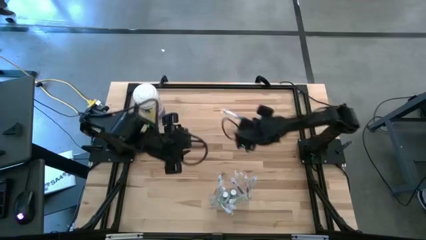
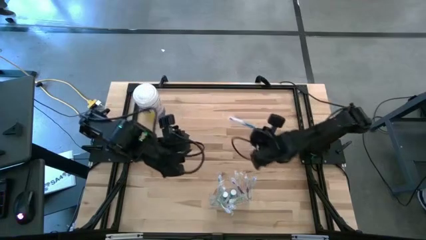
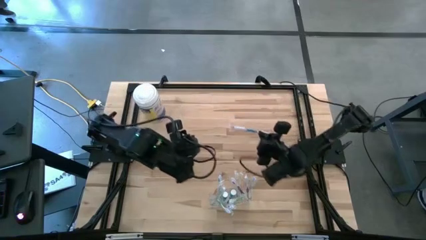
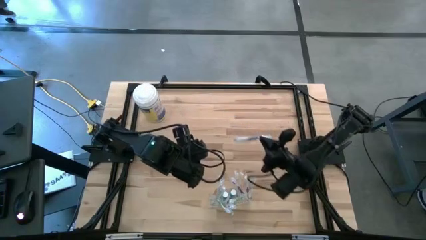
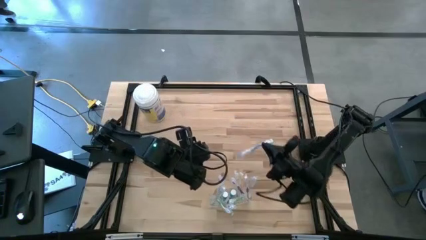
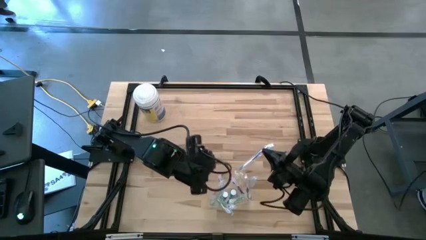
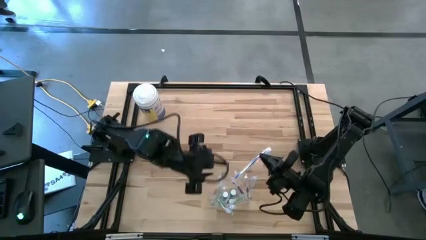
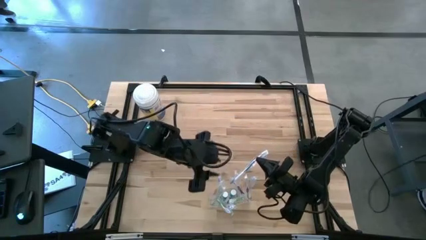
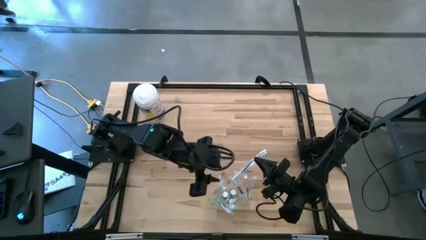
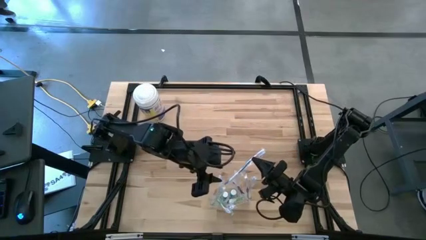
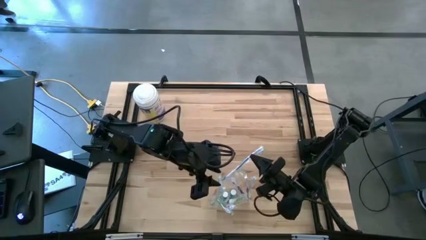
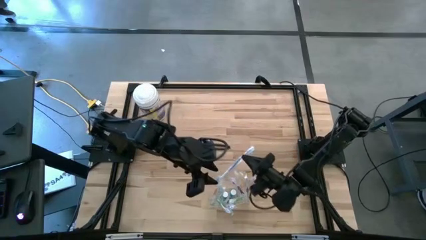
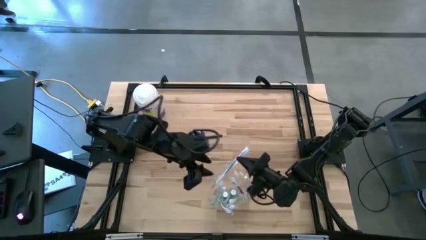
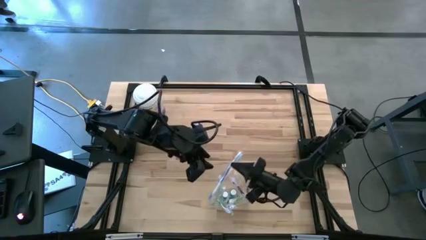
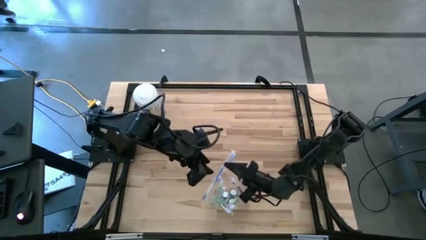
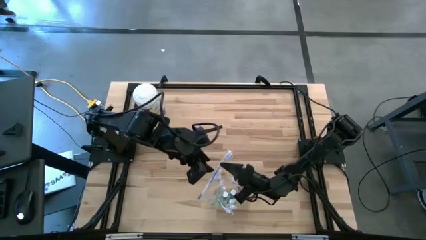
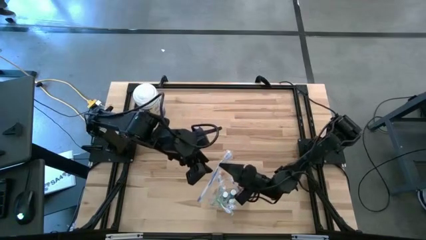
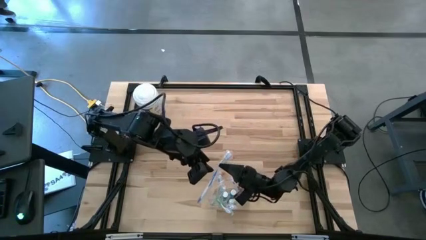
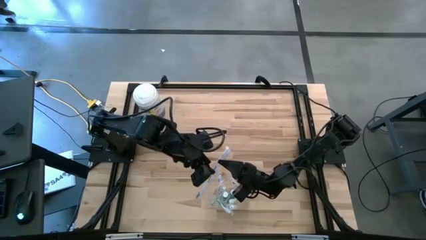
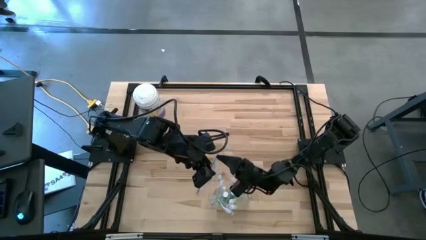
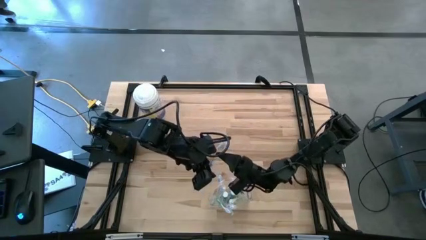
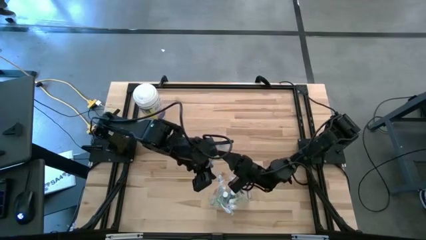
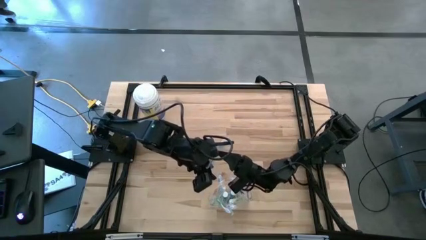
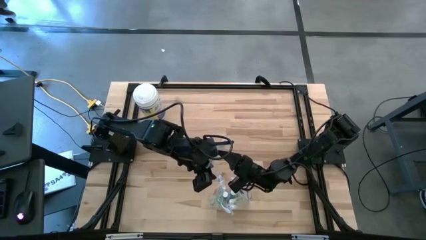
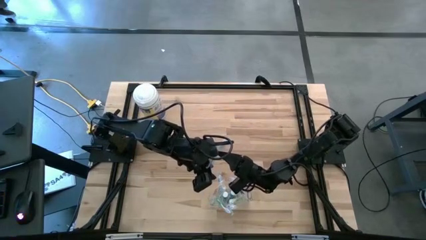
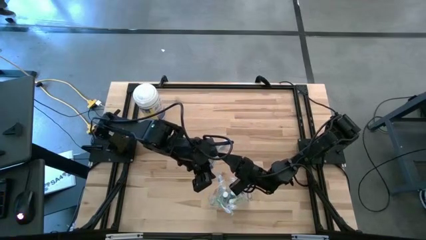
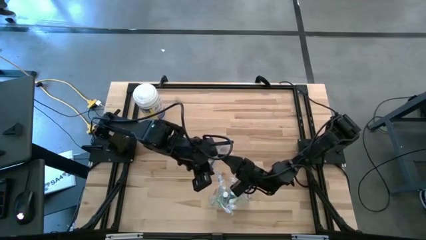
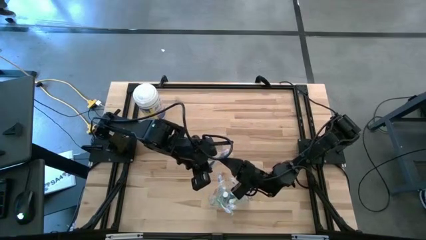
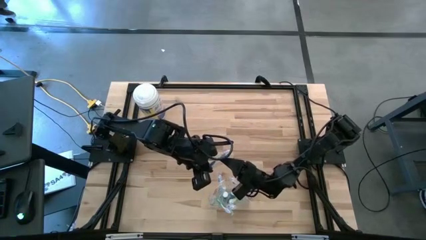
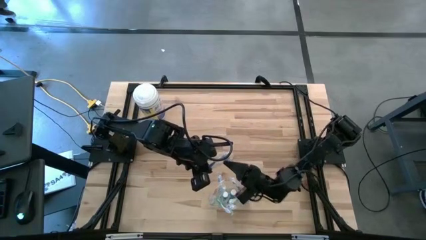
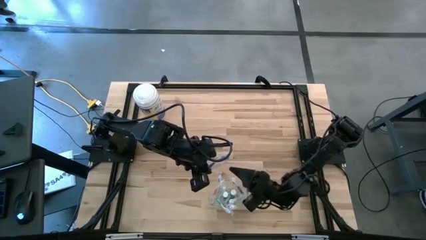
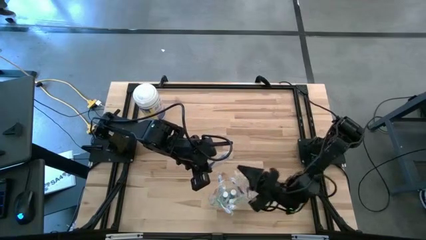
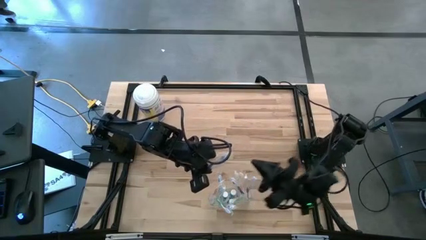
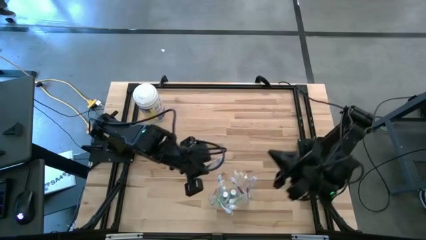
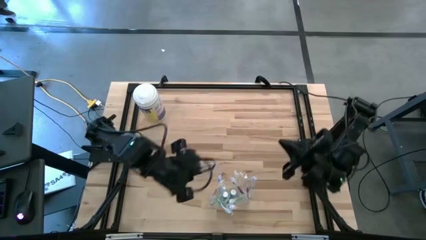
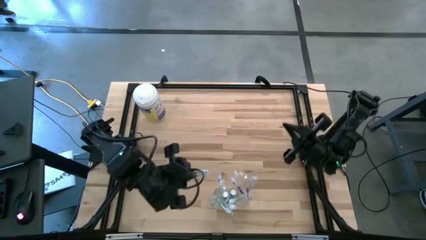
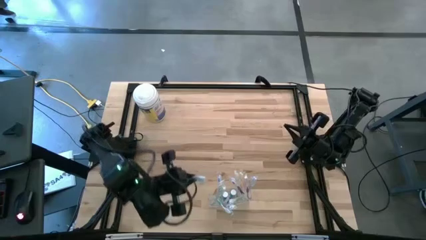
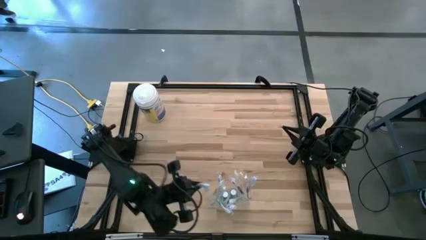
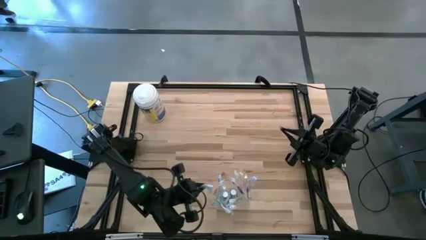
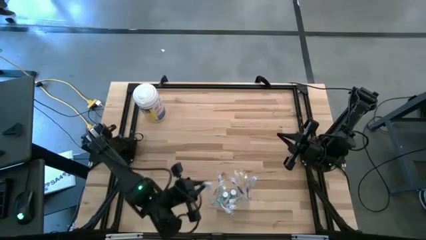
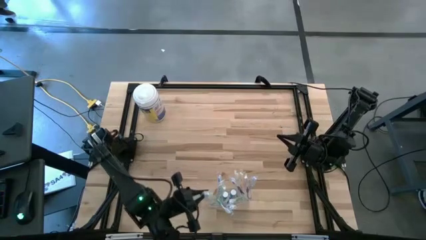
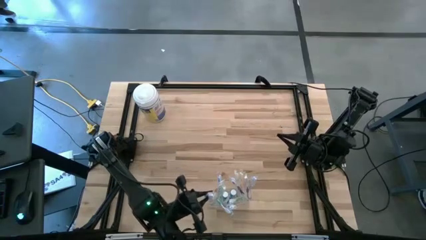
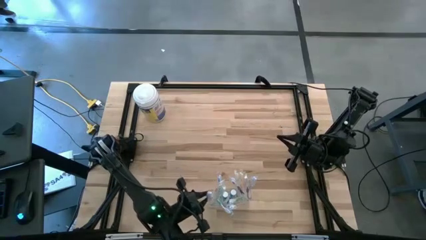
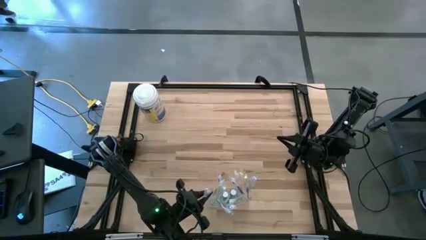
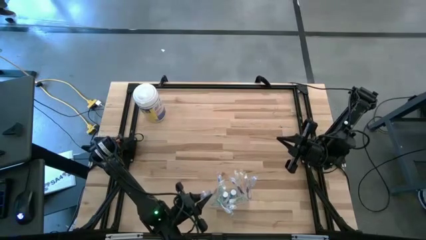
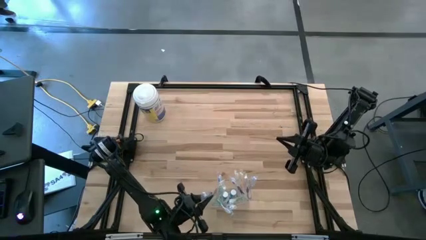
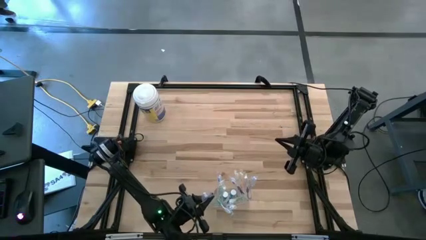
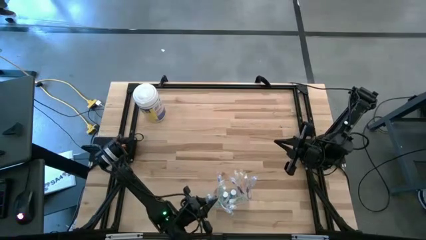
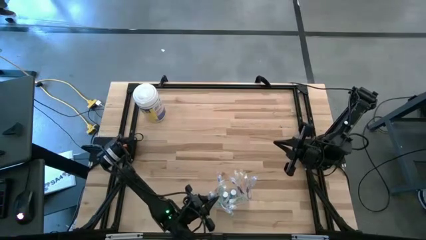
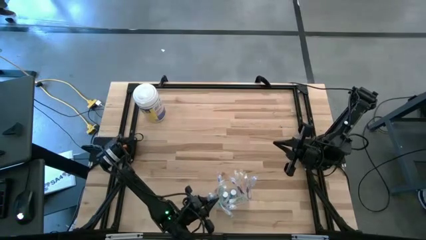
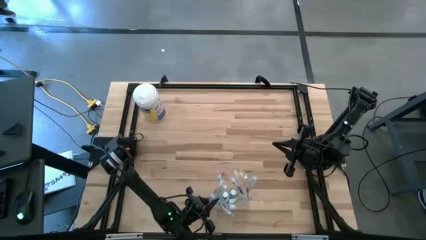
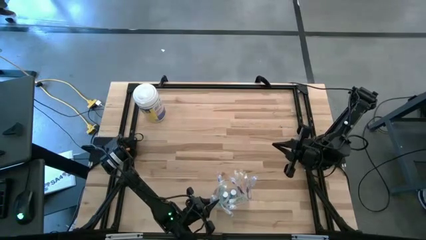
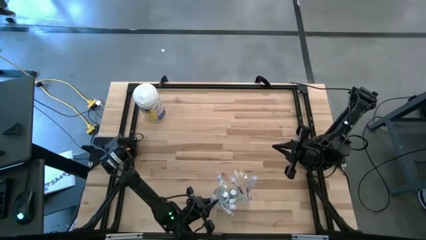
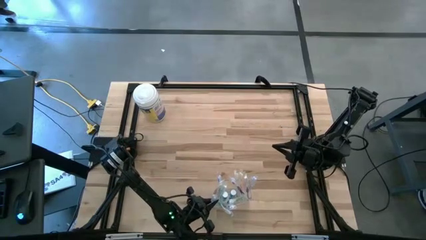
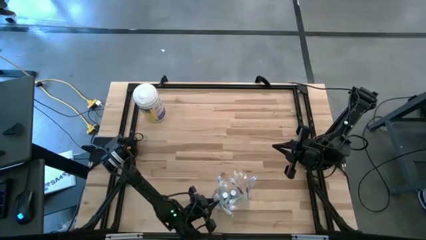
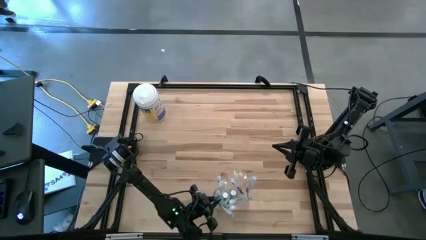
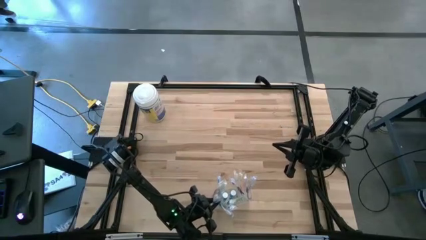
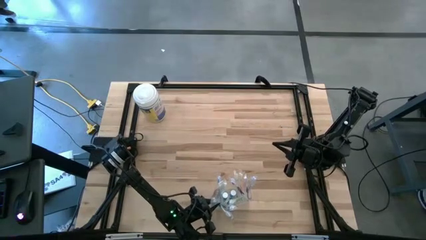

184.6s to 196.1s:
Task: Pick & Place toothbrushing station
Put the blue toothbrush into the transparent bin

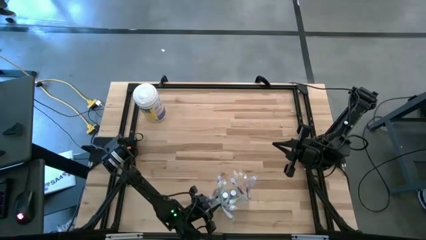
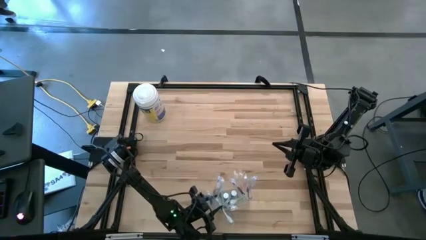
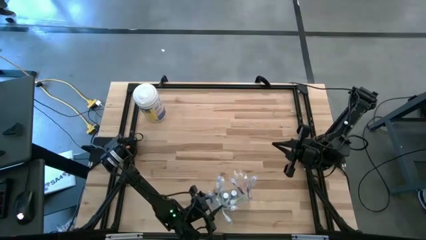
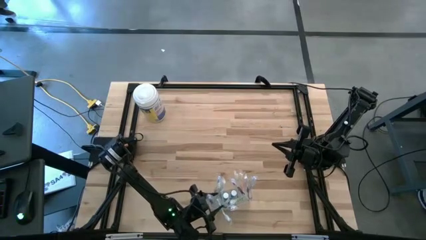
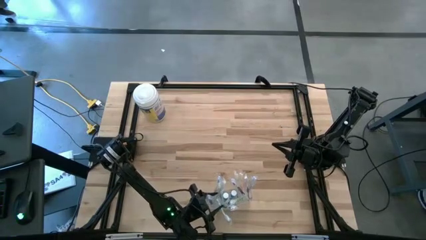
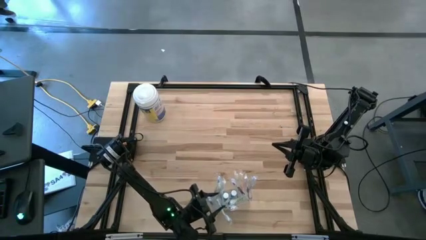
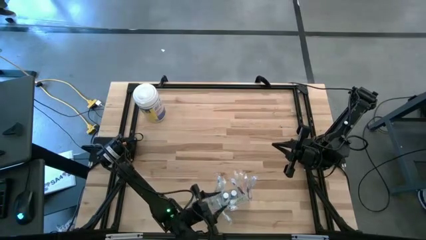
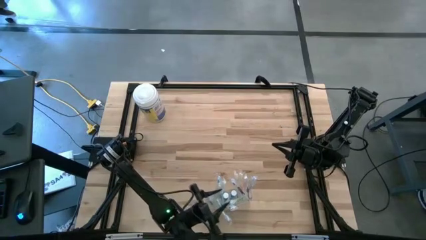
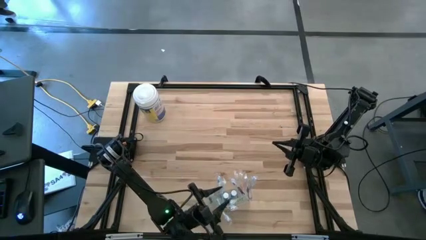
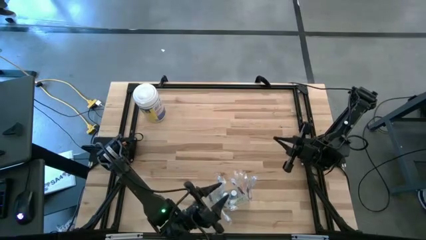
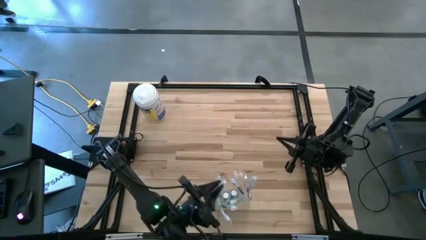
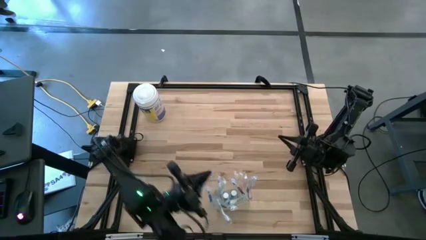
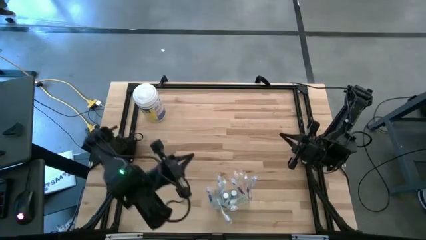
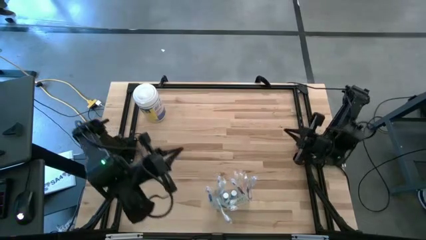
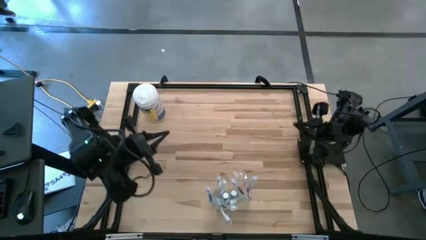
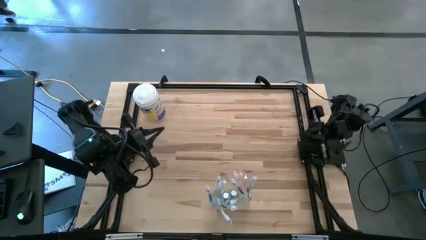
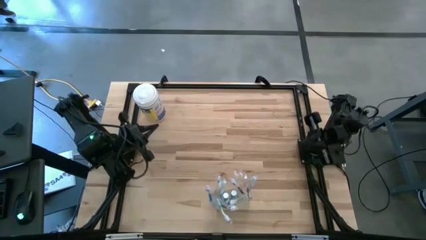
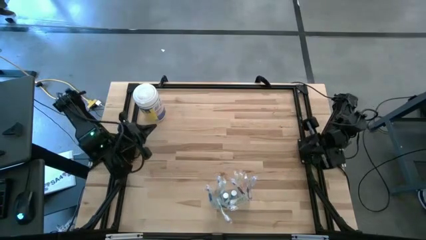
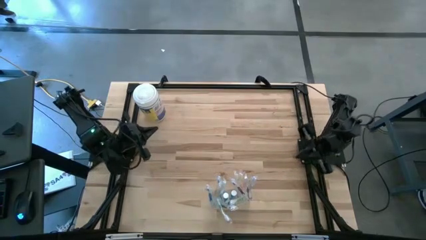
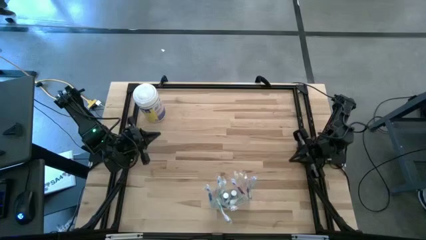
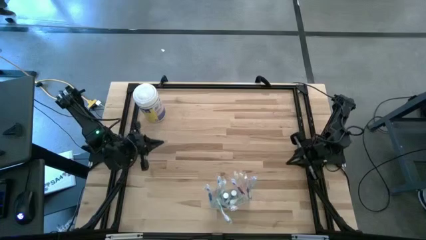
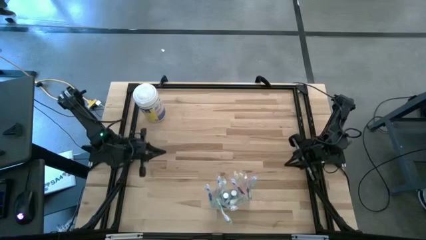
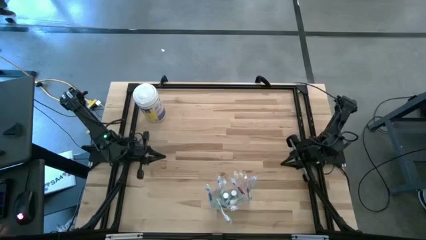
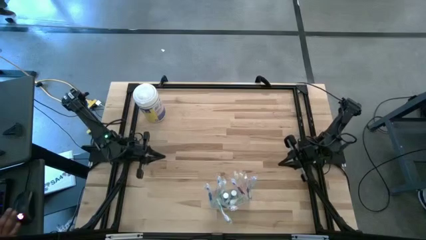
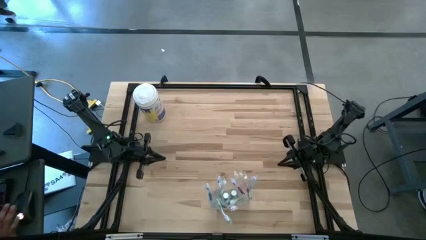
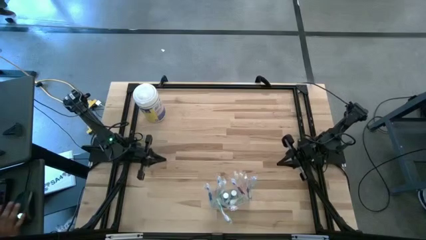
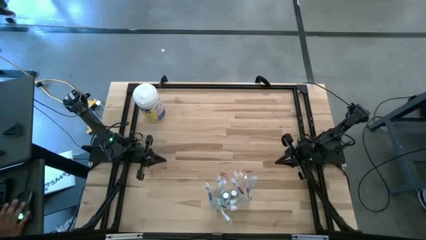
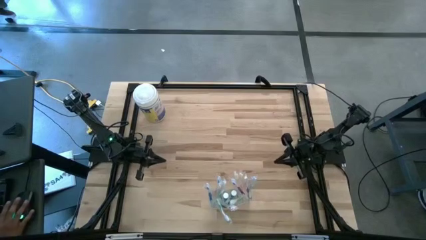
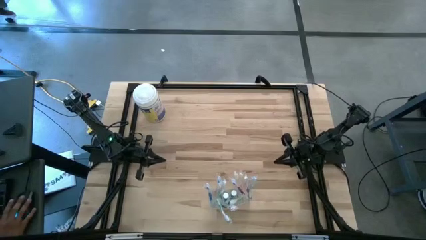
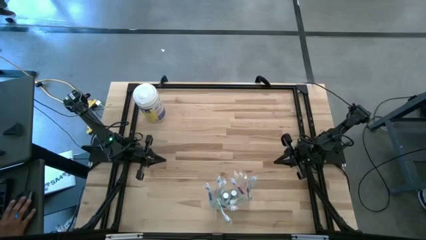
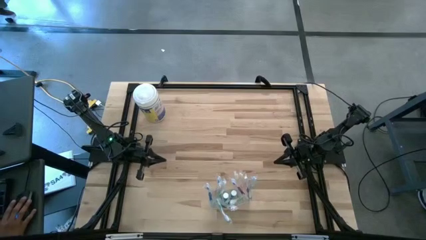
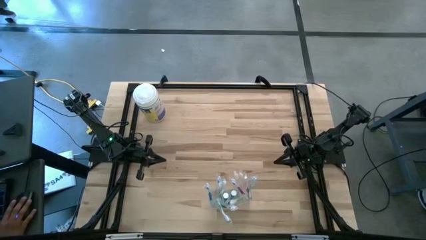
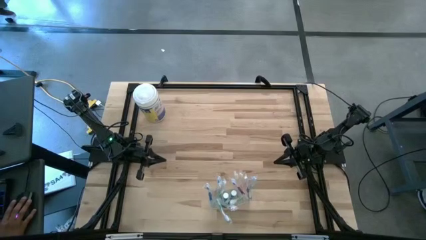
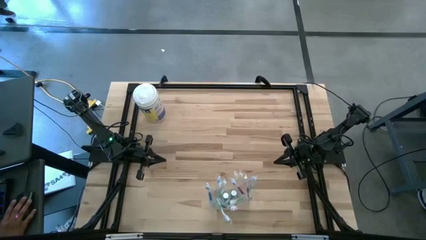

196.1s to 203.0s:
Return to Home Position
